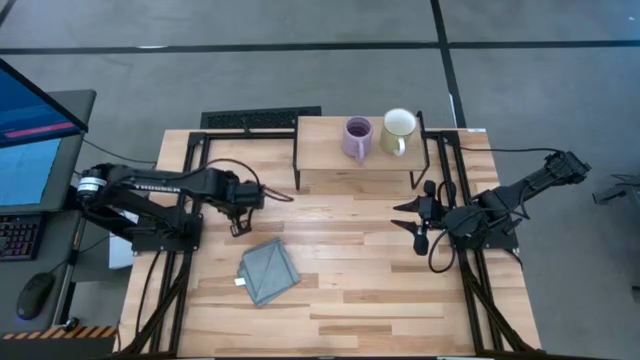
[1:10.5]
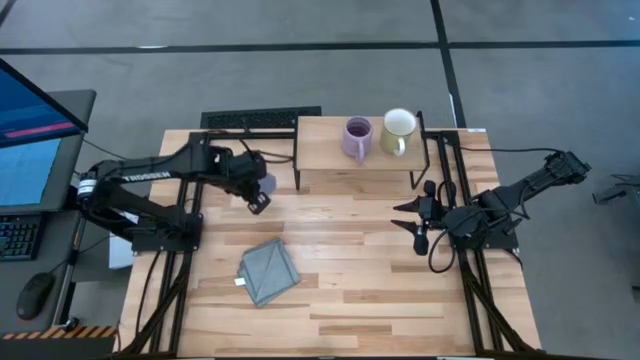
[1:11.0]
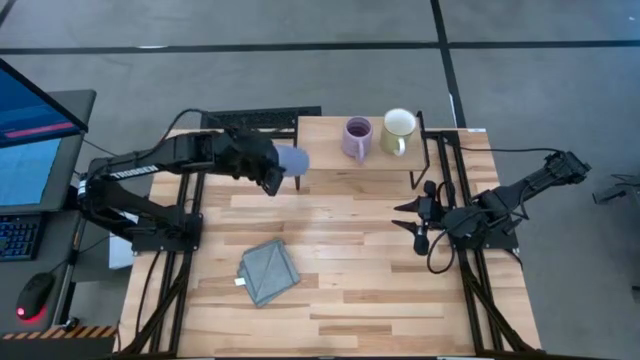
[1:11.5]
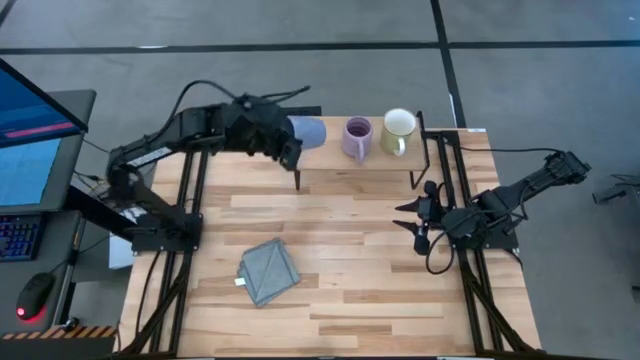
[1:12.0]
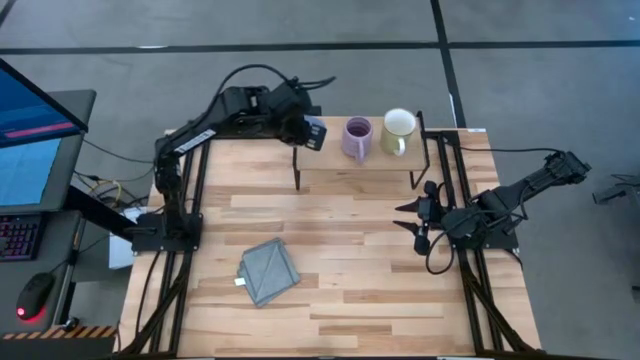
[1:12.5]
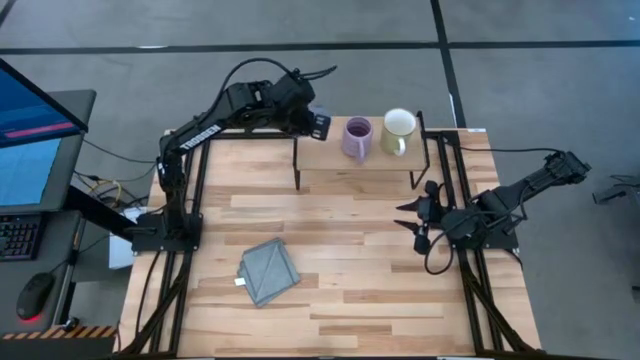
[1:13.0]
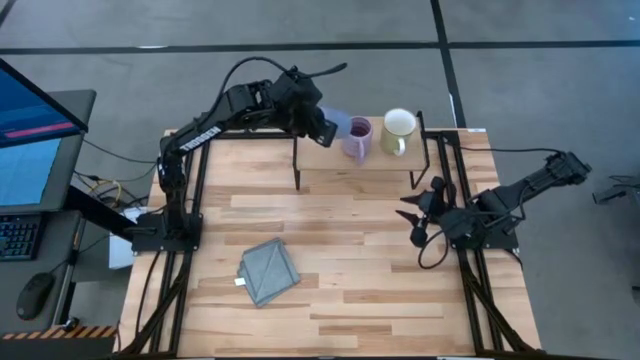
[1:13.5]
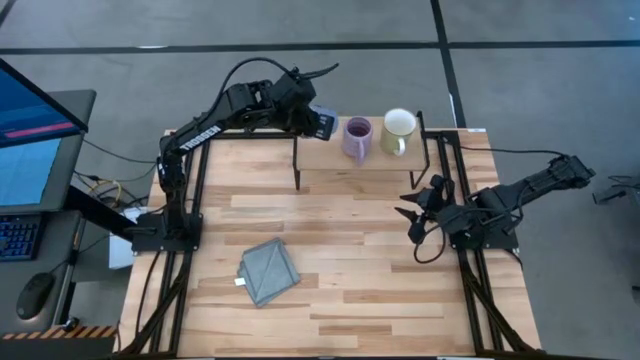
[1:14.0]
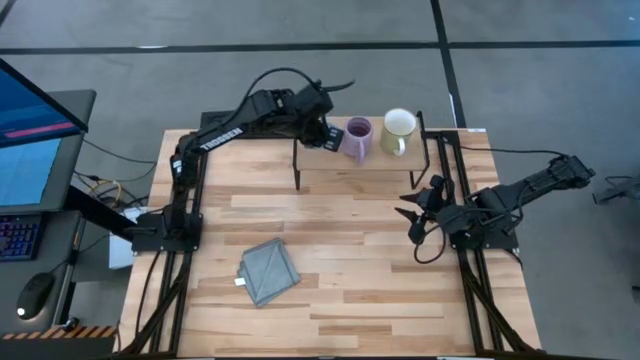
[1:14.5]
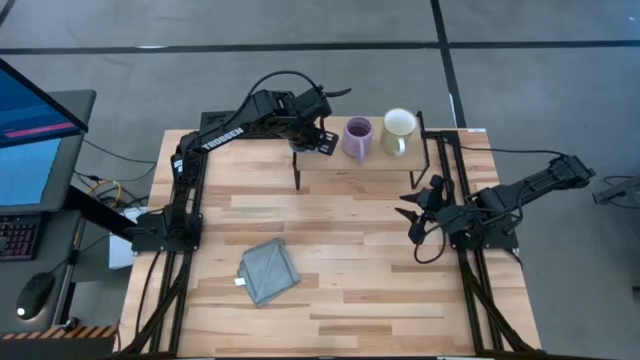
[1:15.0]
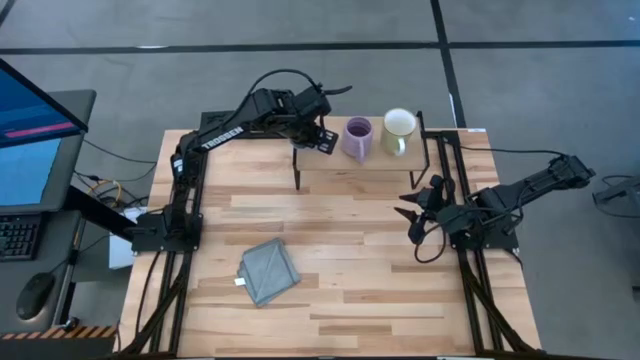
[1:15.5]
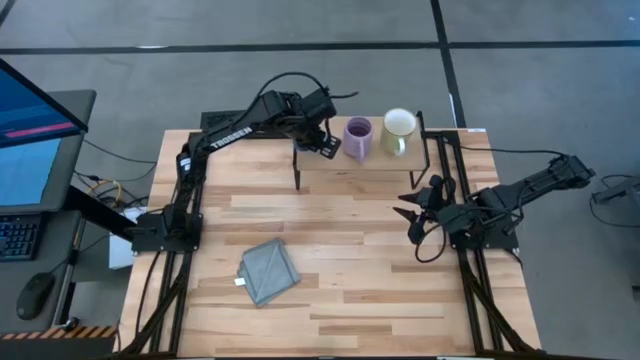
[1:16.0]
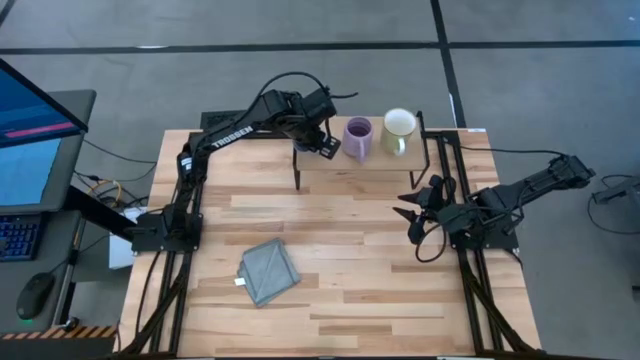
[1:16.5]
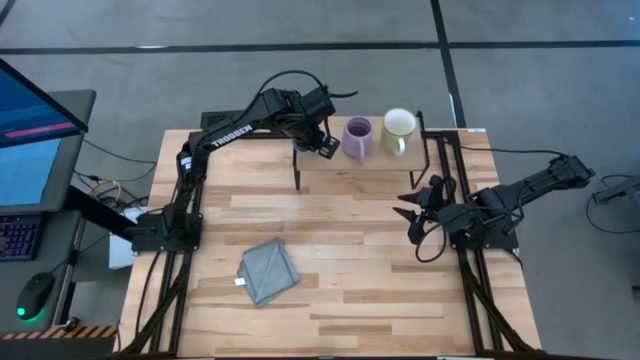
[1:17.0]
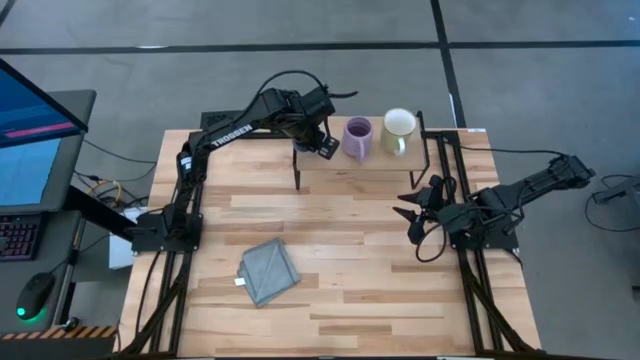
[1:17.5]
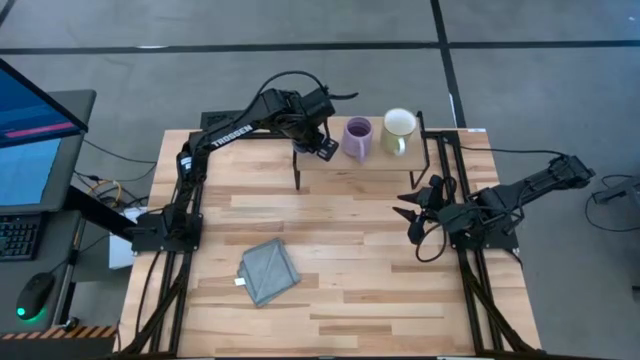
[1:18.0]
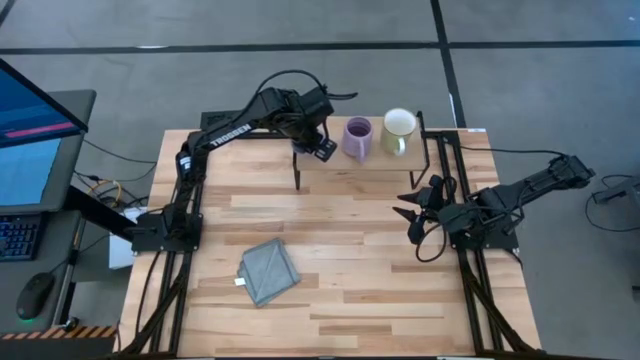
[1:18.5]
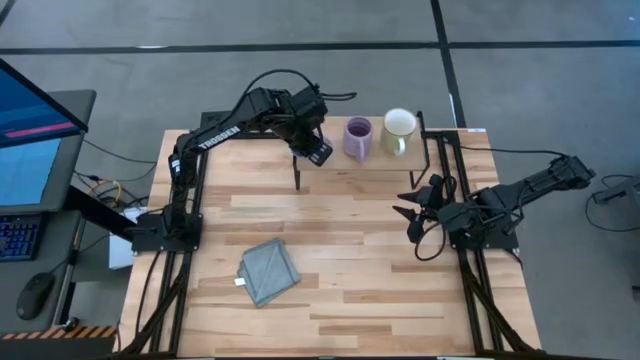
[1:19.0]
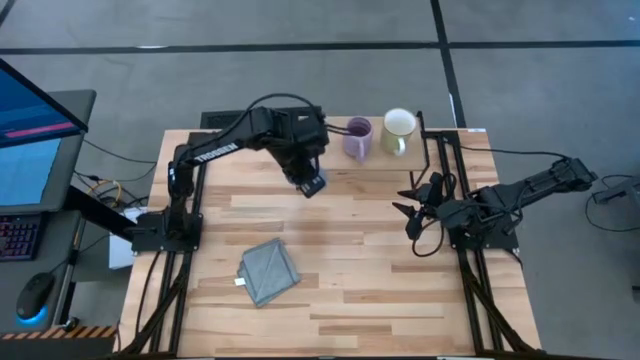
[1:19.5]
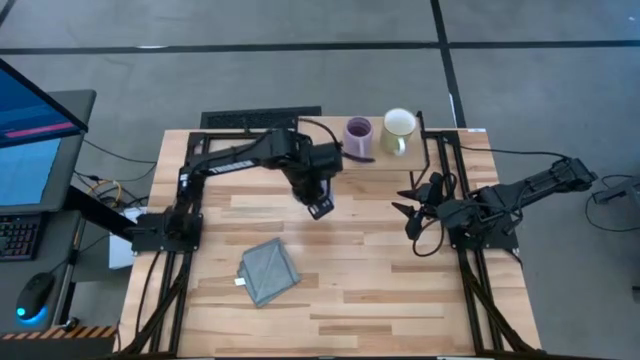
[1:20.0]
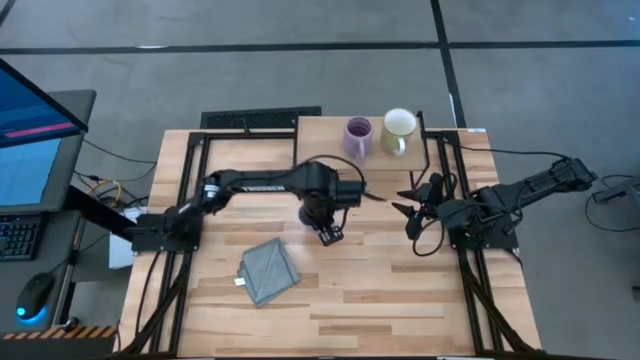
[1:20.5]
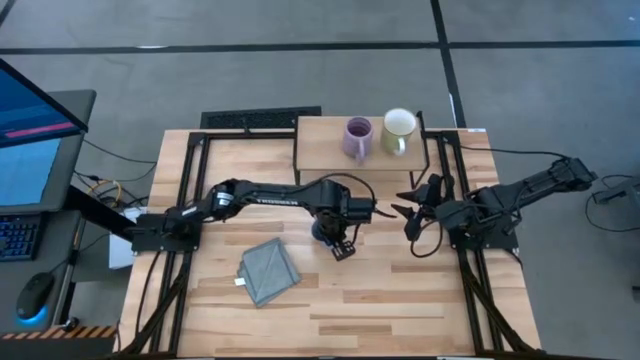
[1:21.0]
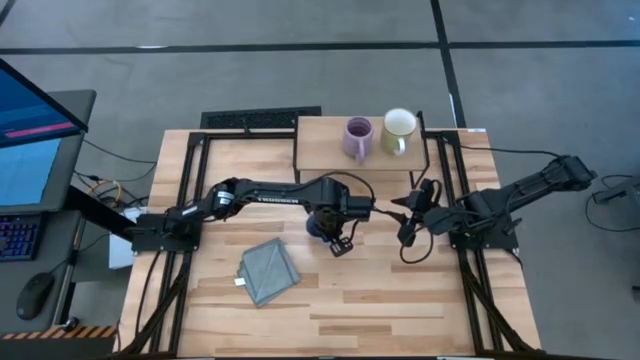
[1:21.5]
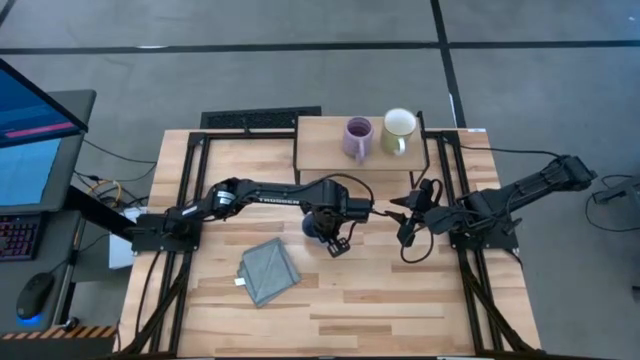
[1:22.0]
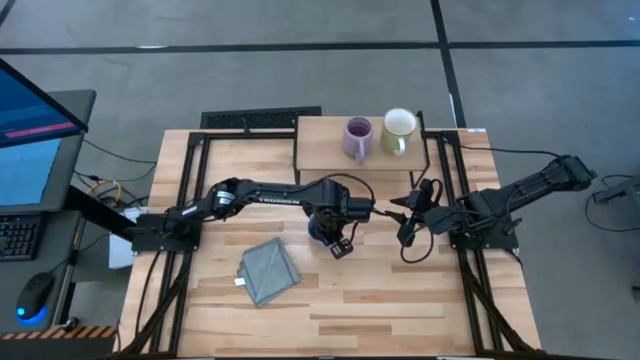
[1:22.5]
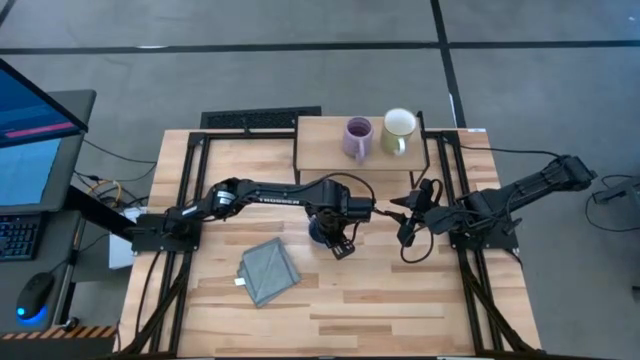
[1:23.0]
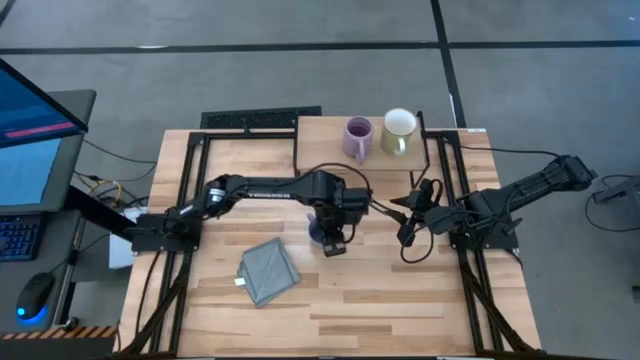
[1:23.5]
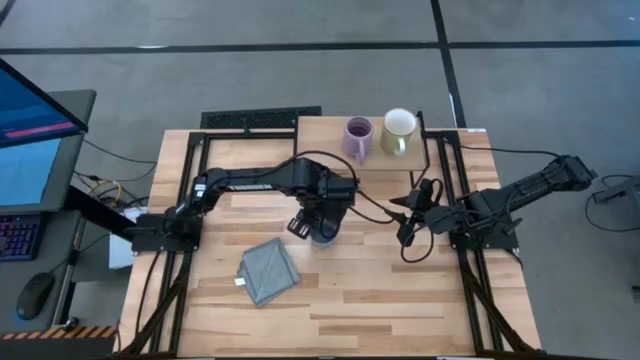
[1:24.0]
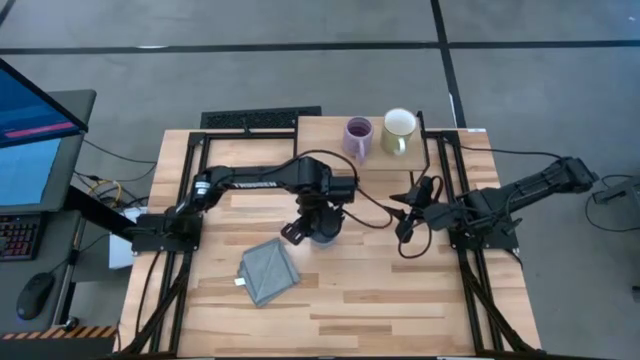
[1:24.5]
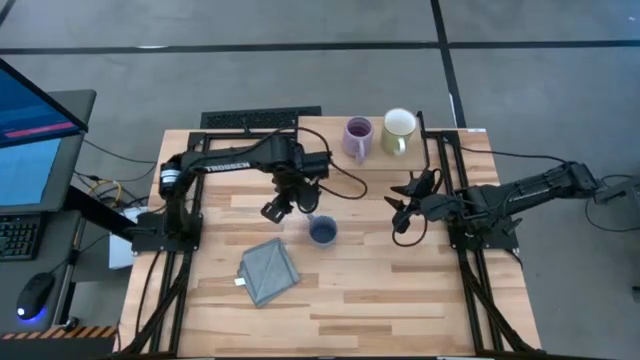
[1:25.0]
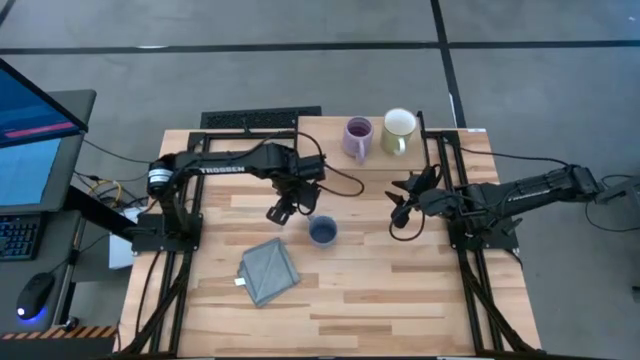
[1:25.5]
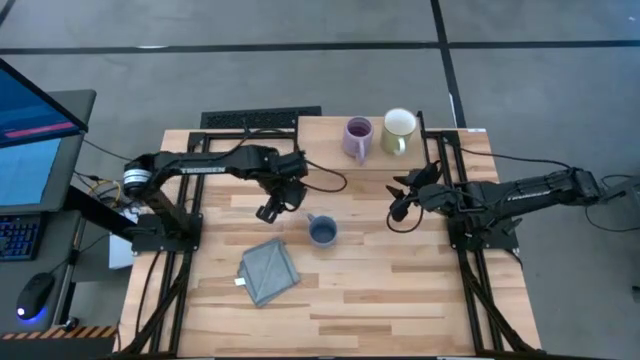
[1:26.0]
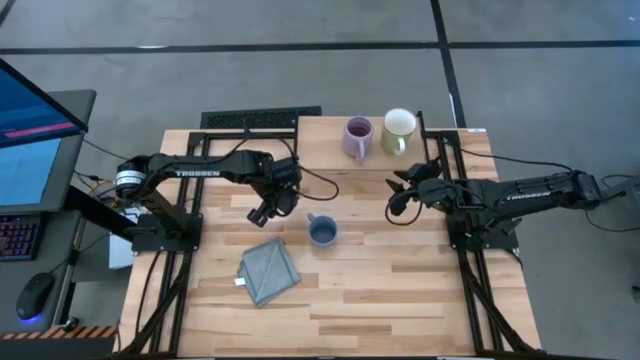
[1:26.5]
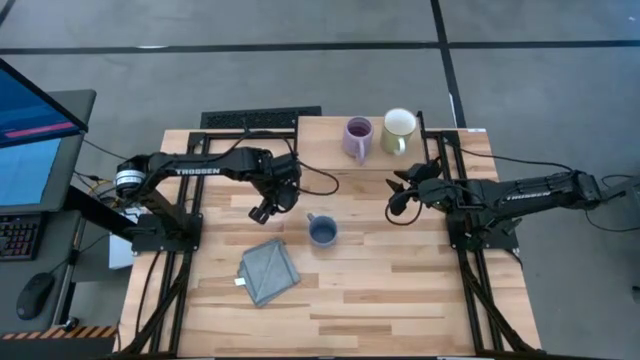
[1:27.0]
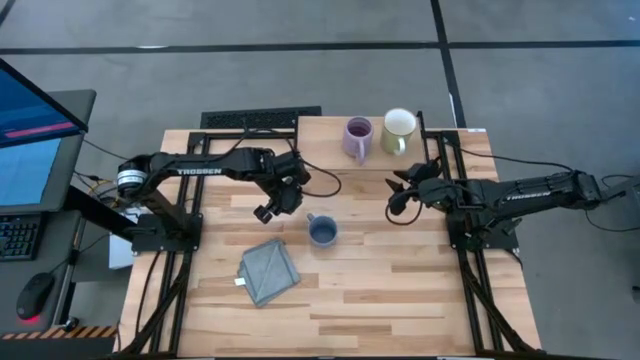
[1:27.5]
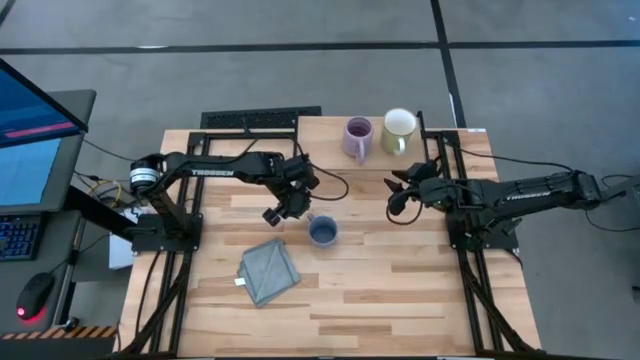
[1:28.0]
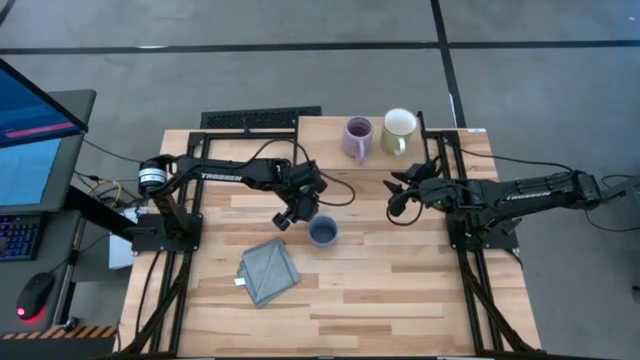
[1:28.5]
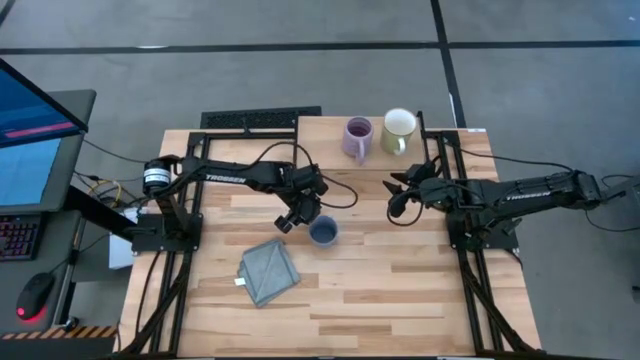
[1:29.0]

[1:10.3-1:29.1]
Task: Stack small to large cups/mugs on shelf
Put the blue mug on the shelf
